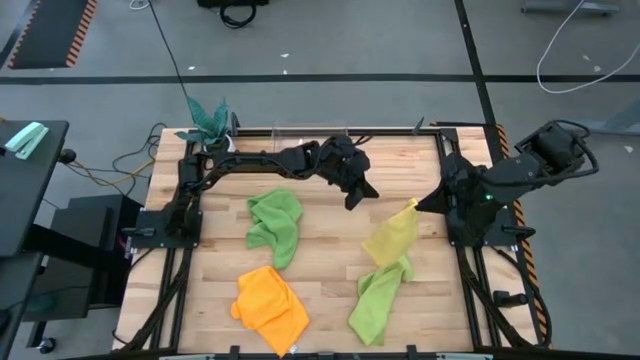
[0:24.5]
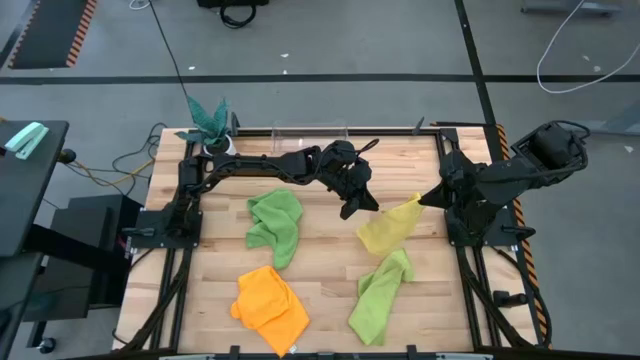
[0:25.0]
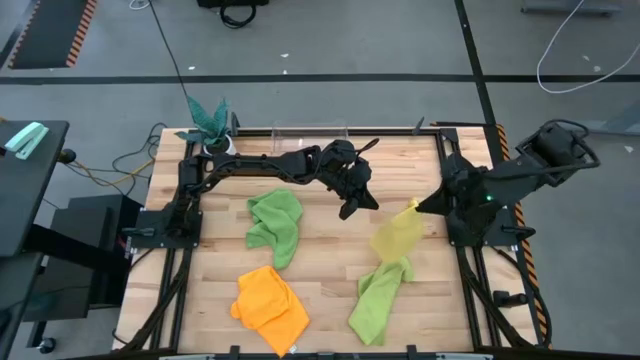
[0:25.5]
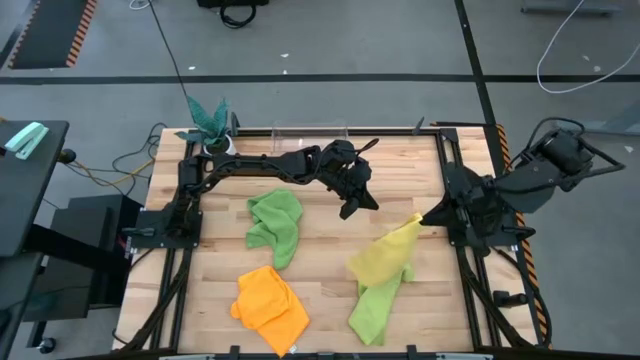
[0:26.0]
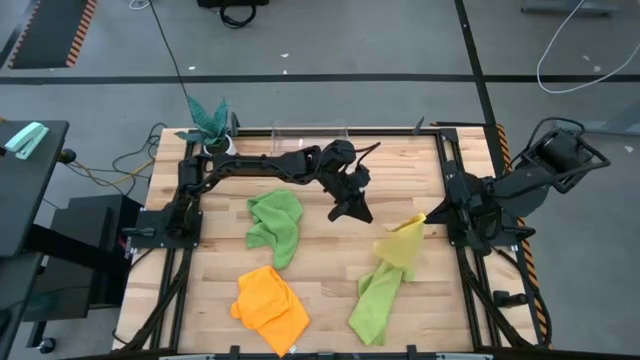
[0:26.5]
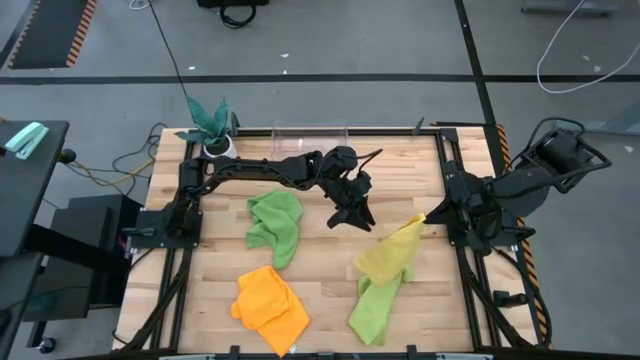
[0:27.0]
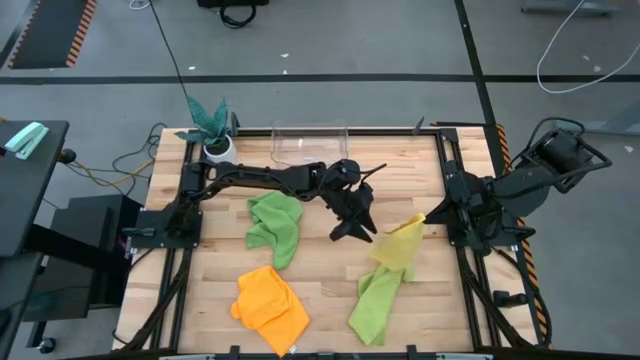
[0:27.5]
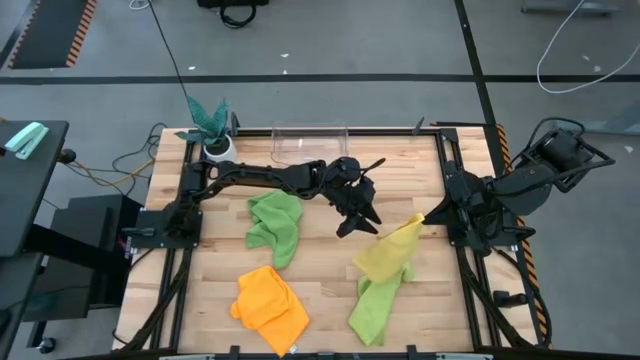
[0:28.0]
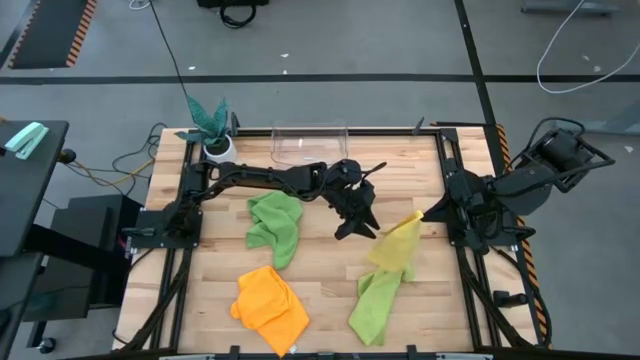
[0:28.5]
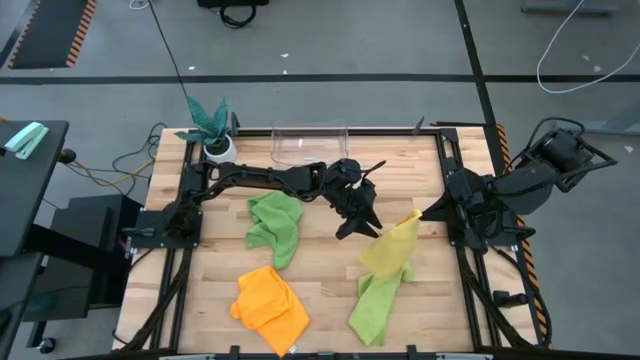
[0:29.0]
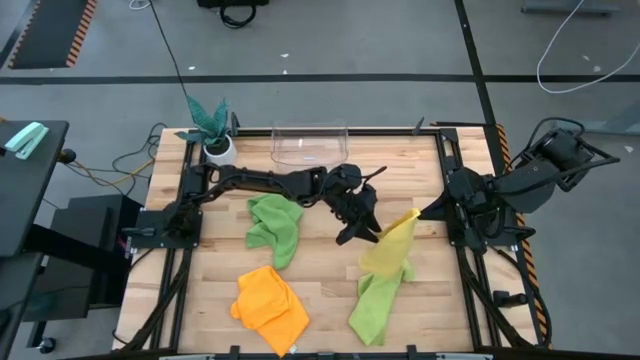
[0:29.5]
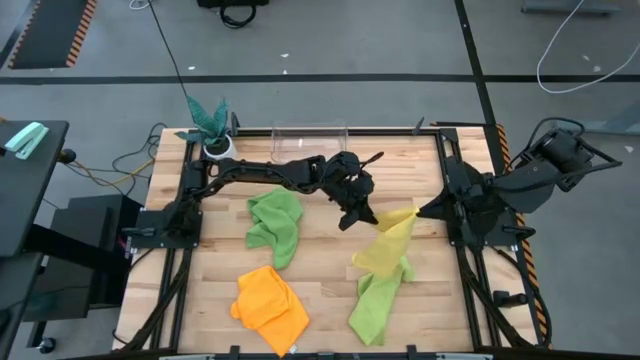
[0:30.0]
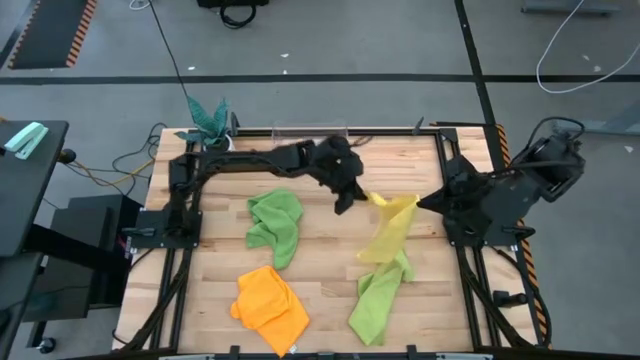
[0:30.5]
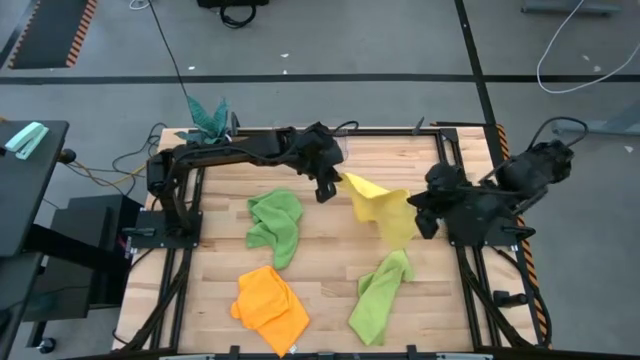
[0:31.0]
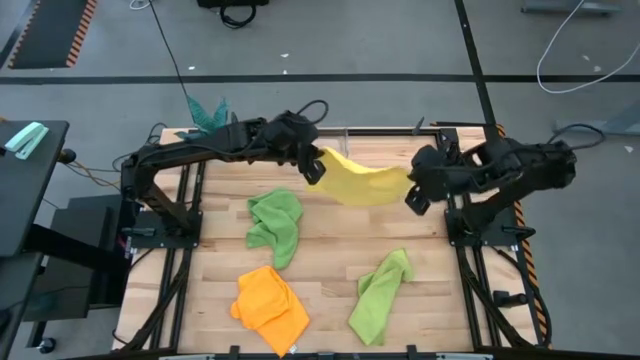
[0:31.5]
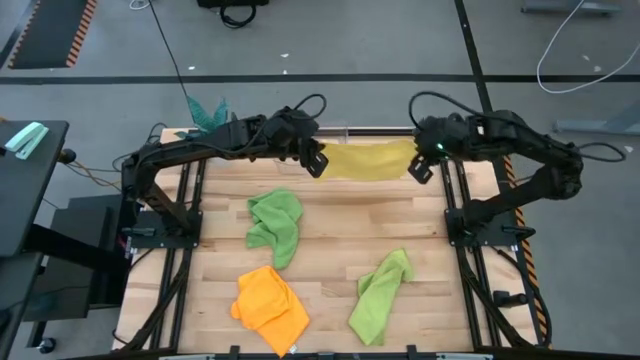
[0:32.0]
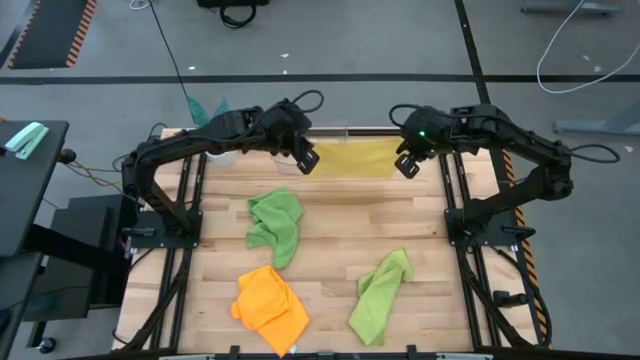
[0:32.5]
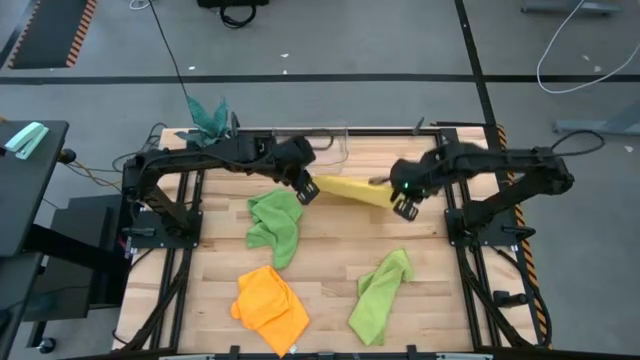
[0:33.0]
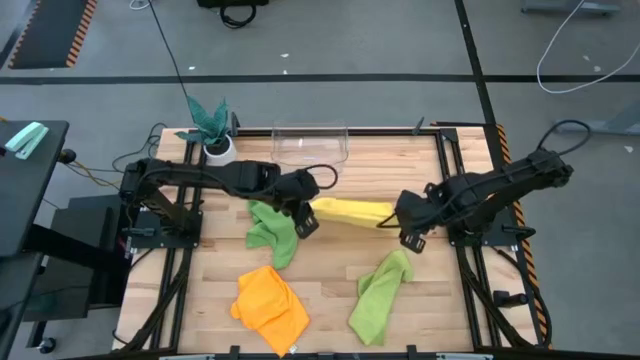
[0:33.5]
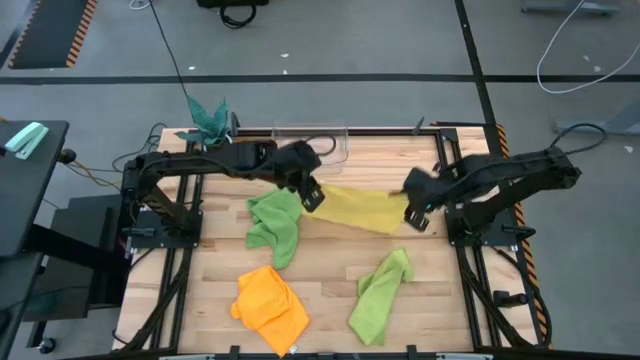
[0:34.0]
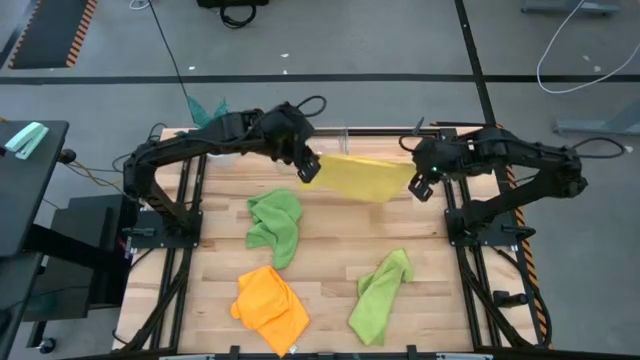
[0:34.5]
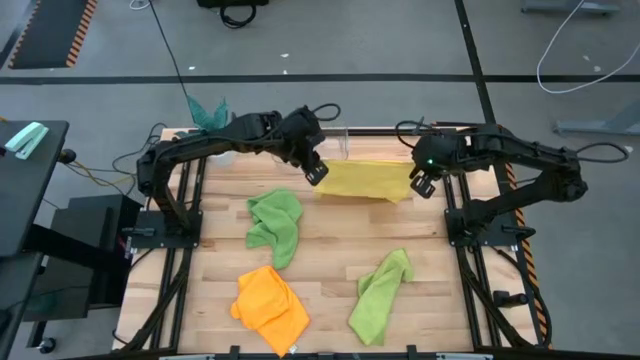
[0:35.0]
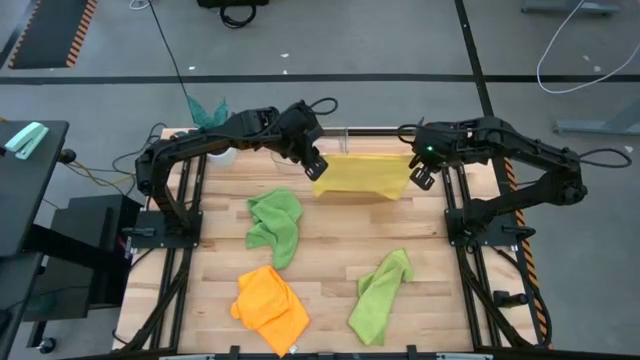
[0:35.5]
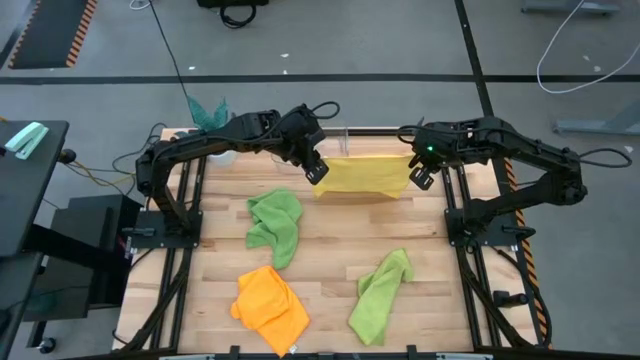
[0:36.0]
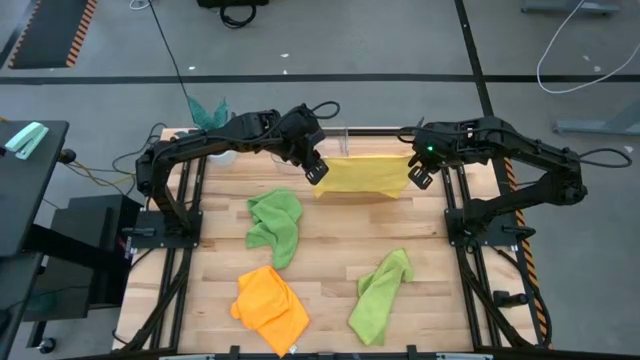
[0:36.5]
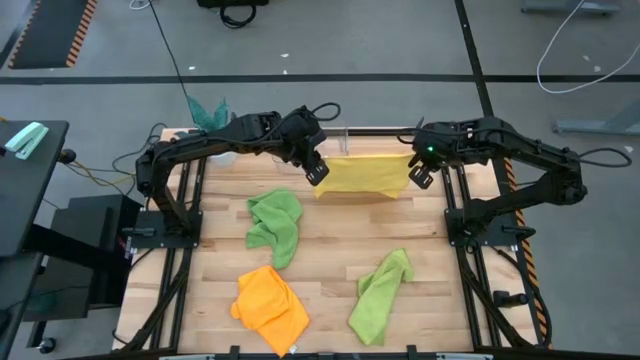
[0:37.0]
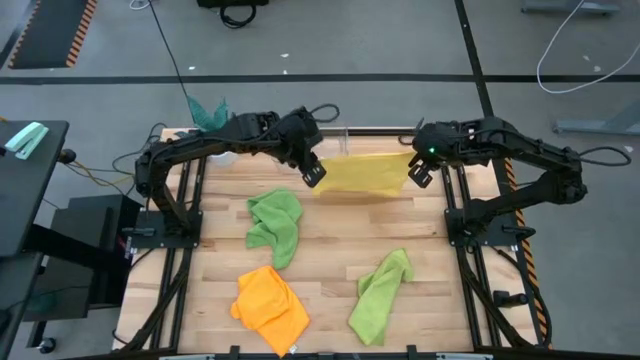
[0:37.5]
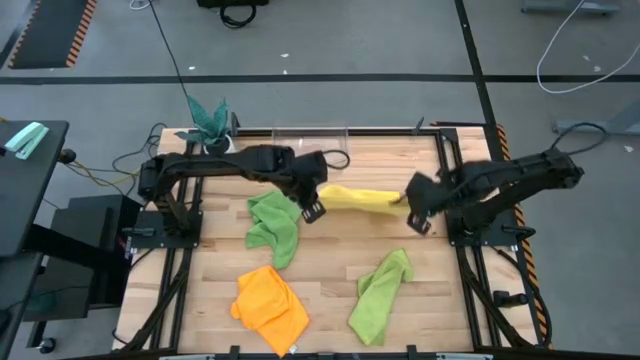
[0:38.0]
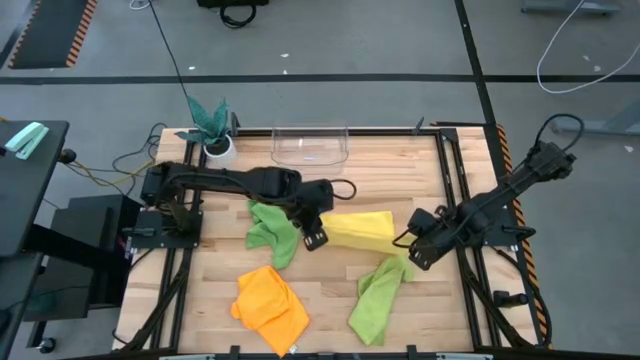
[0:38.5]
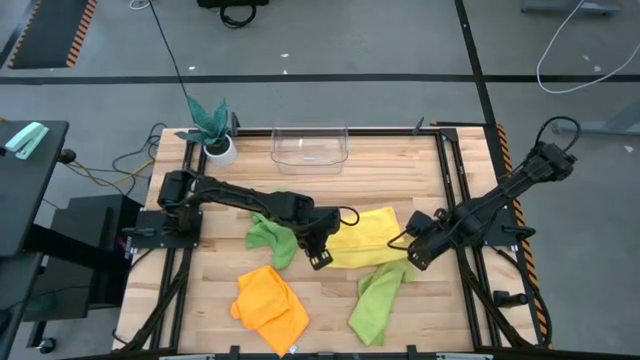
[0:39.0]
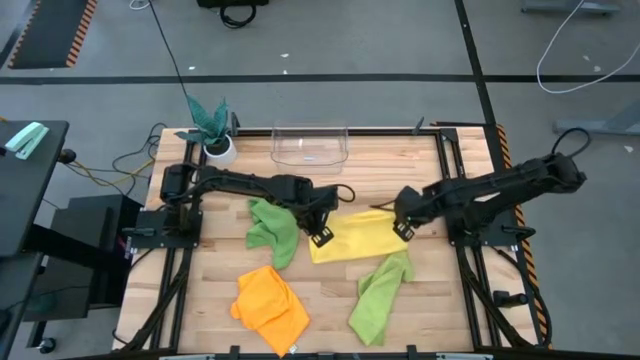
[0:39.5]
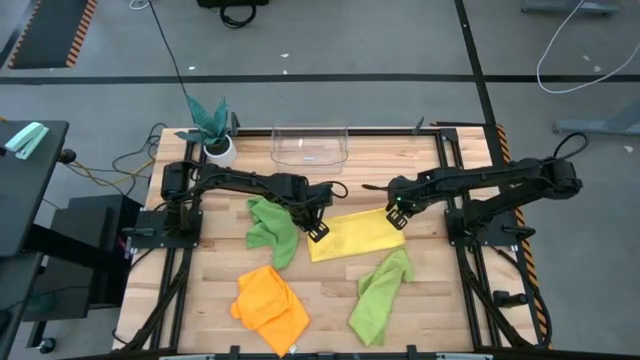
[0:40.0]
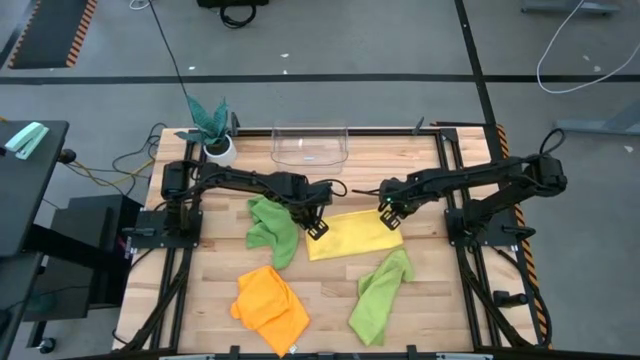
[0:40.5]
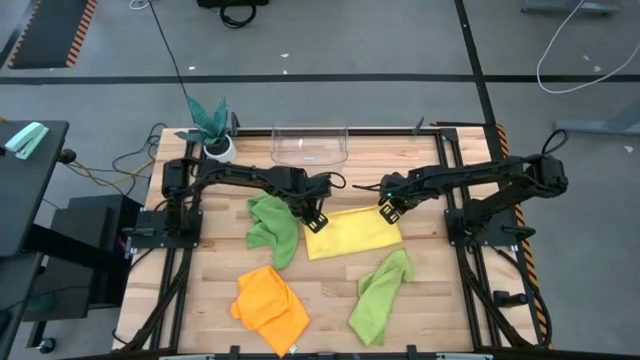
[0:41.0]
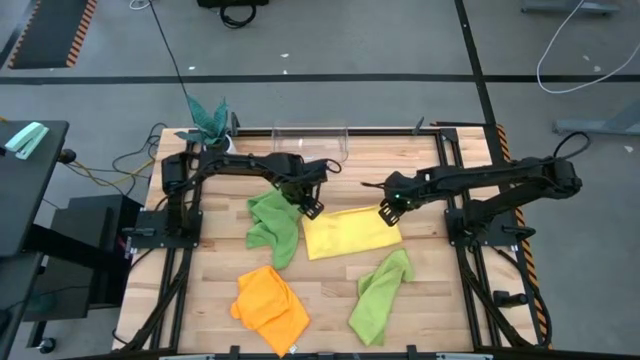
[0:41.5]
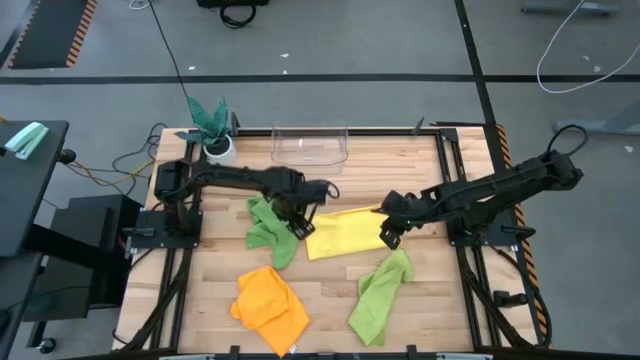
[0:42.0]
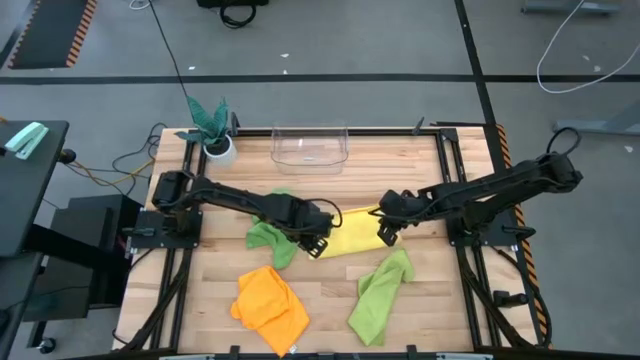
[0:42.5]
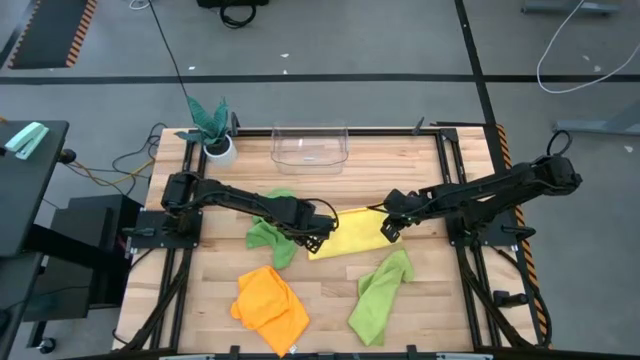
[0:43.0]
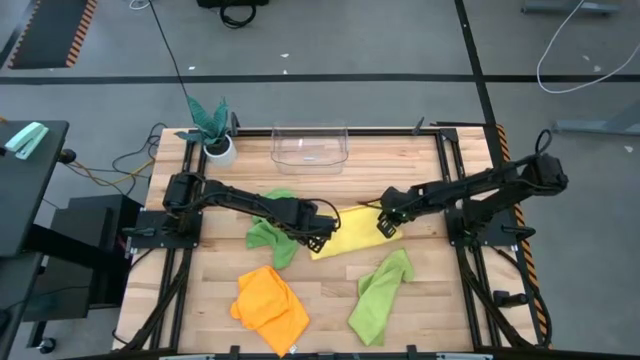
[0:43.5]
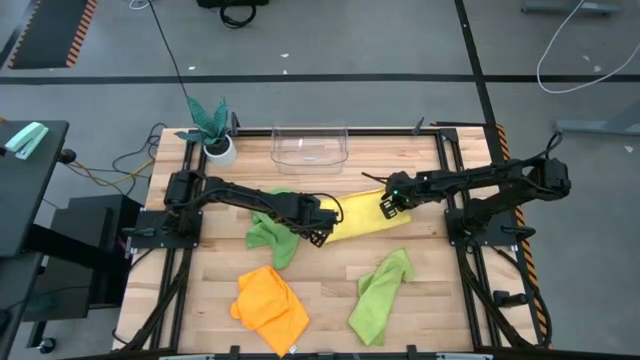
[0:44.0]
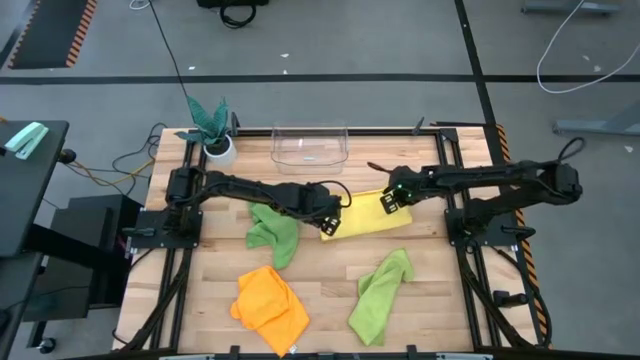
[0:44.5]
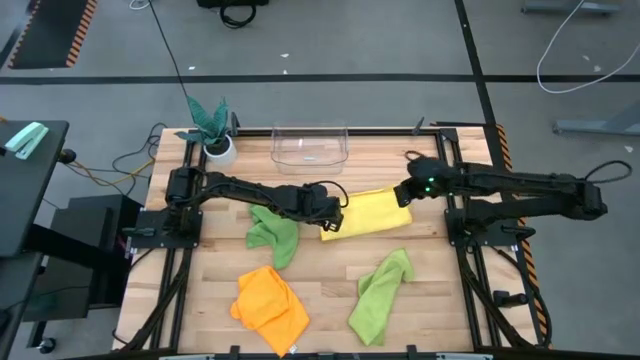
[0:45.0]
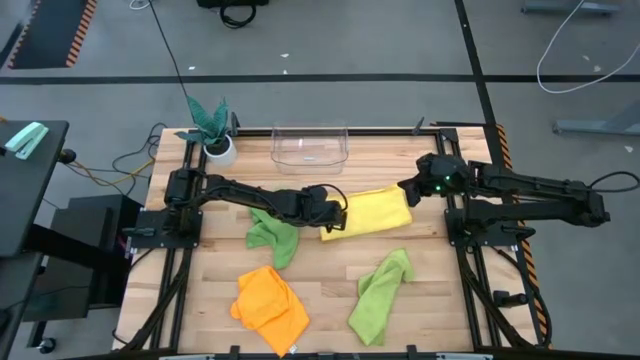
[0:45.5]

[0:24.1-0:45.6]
Task: Fold microfiber towels
Fold the yellow towel
